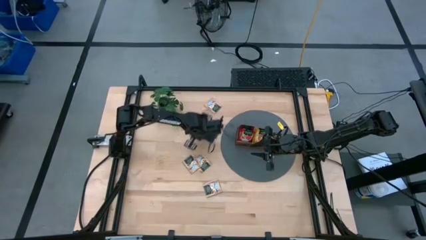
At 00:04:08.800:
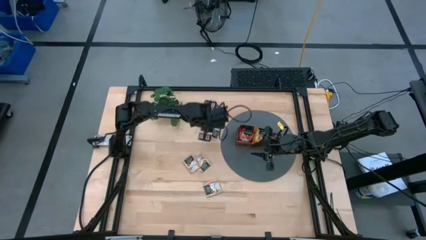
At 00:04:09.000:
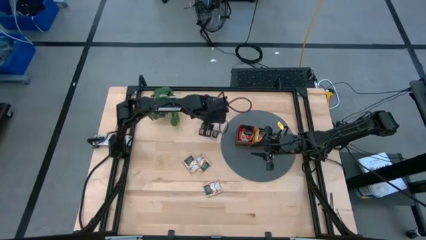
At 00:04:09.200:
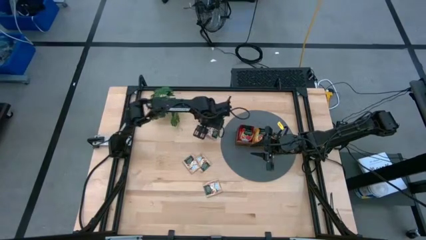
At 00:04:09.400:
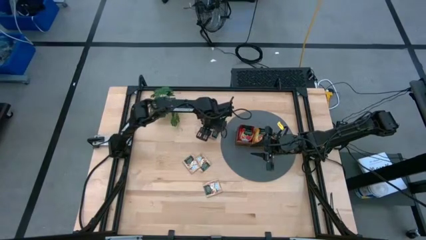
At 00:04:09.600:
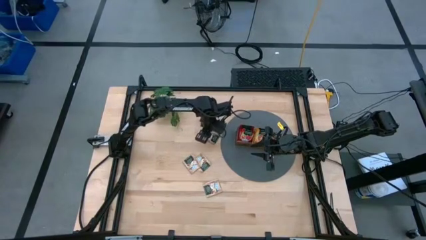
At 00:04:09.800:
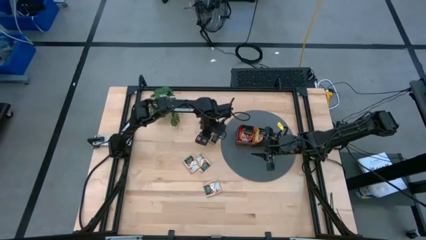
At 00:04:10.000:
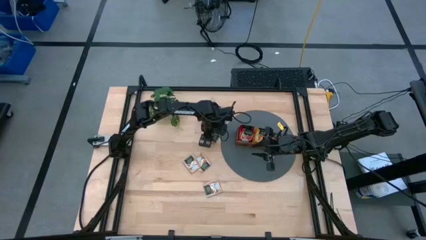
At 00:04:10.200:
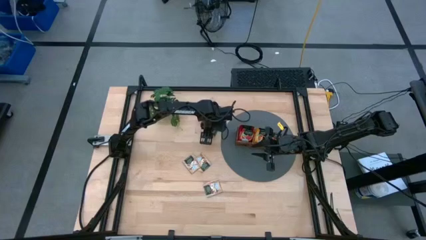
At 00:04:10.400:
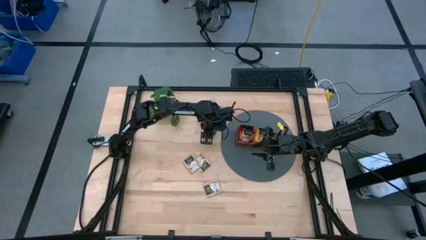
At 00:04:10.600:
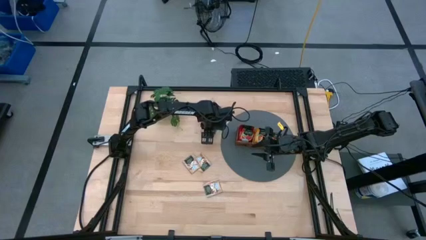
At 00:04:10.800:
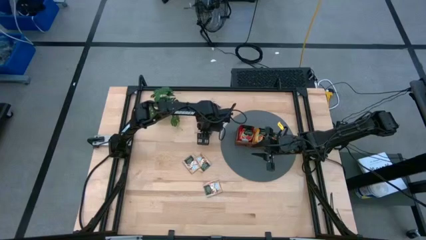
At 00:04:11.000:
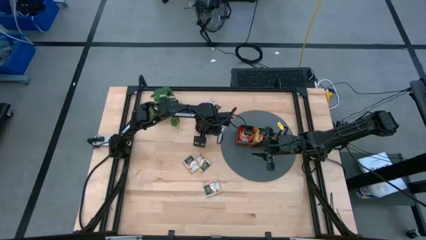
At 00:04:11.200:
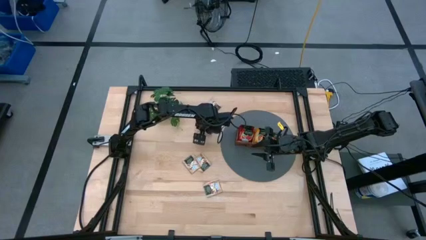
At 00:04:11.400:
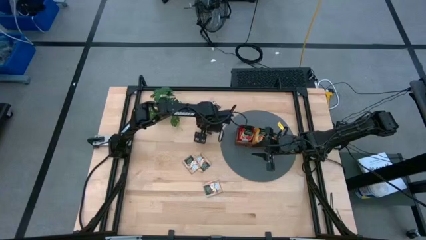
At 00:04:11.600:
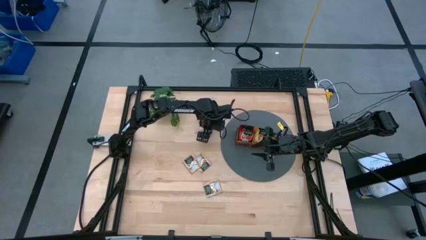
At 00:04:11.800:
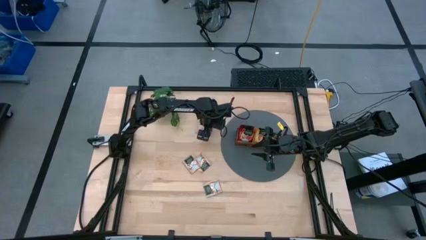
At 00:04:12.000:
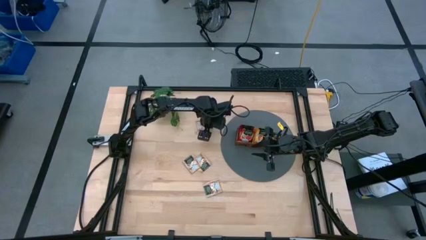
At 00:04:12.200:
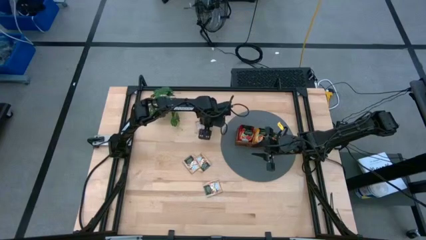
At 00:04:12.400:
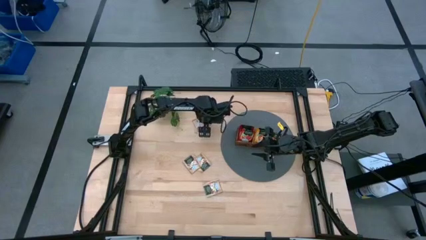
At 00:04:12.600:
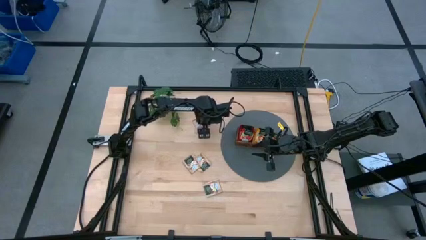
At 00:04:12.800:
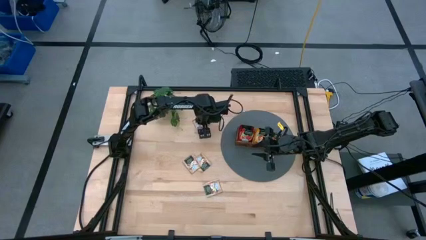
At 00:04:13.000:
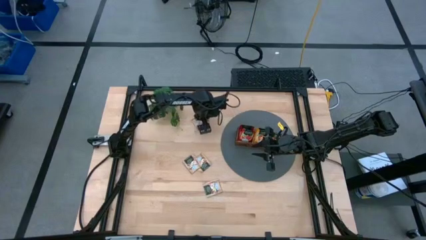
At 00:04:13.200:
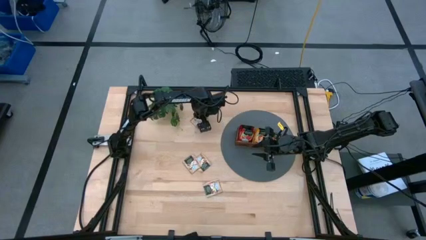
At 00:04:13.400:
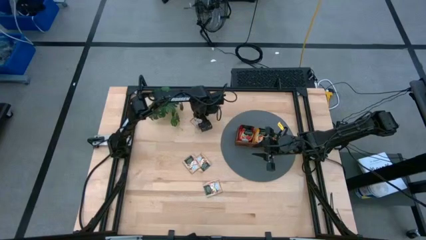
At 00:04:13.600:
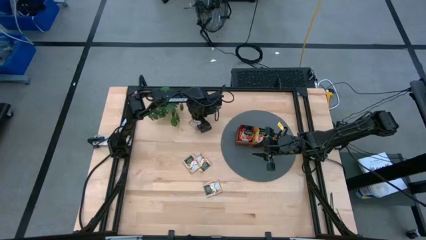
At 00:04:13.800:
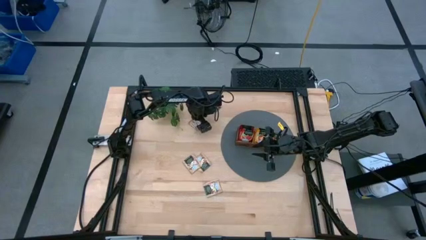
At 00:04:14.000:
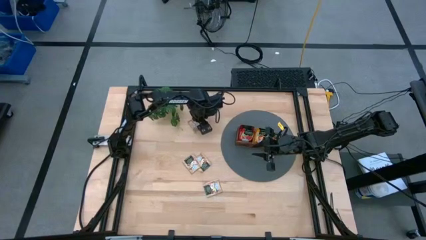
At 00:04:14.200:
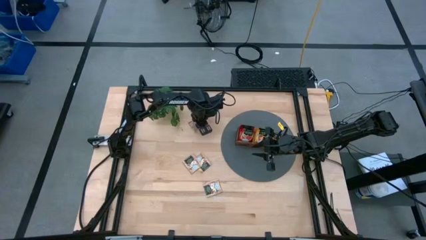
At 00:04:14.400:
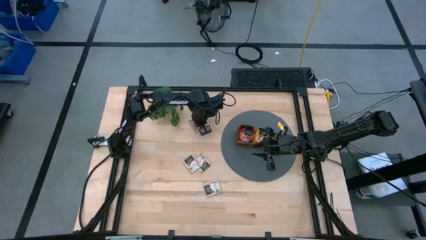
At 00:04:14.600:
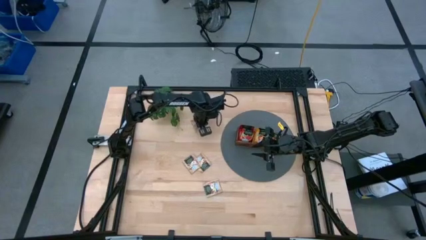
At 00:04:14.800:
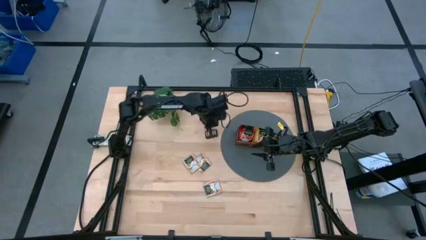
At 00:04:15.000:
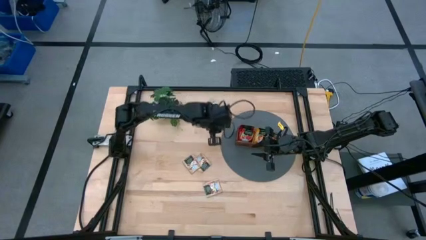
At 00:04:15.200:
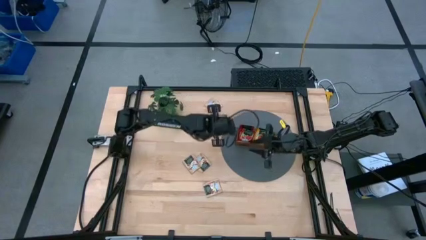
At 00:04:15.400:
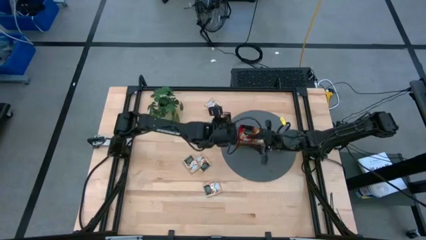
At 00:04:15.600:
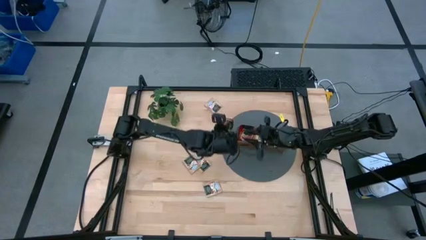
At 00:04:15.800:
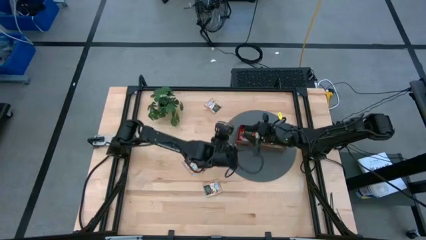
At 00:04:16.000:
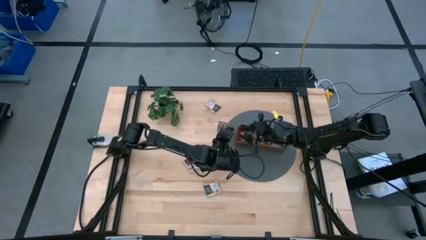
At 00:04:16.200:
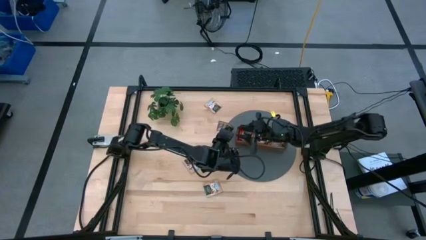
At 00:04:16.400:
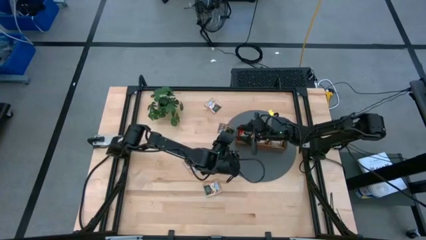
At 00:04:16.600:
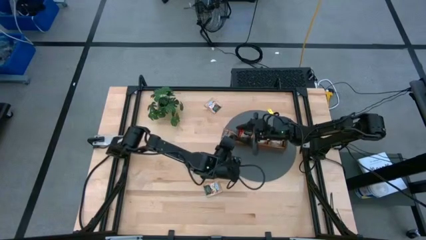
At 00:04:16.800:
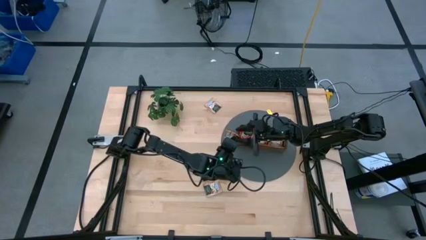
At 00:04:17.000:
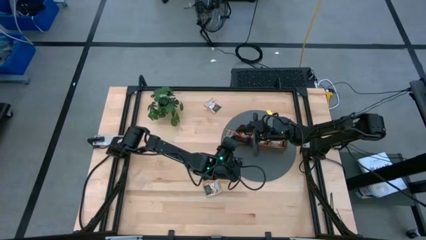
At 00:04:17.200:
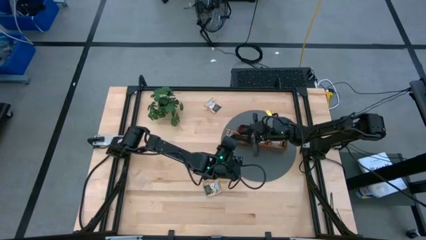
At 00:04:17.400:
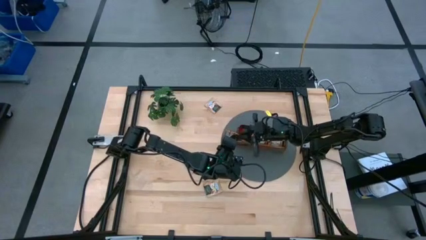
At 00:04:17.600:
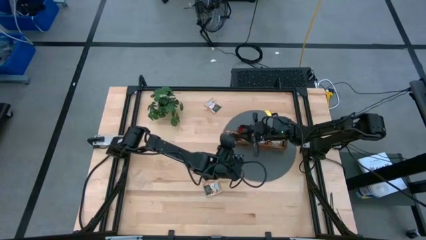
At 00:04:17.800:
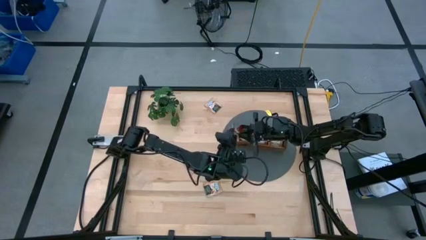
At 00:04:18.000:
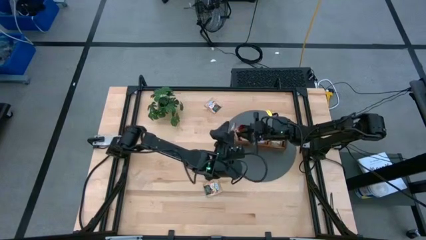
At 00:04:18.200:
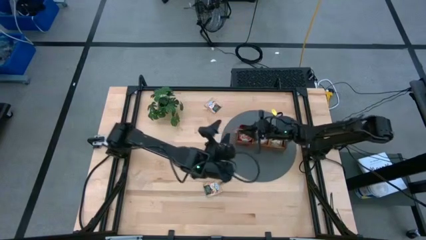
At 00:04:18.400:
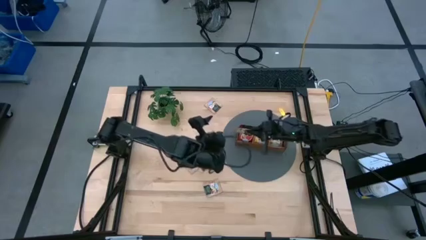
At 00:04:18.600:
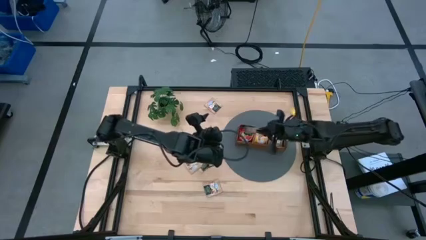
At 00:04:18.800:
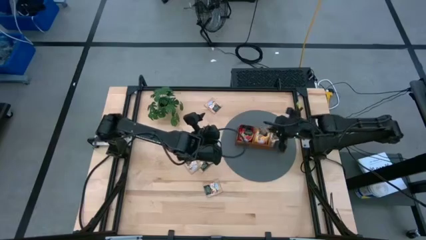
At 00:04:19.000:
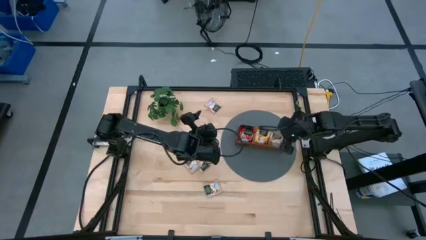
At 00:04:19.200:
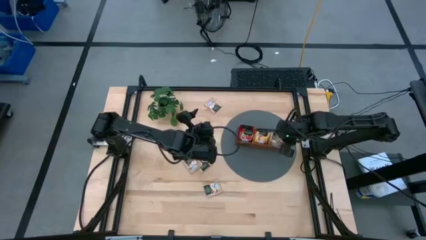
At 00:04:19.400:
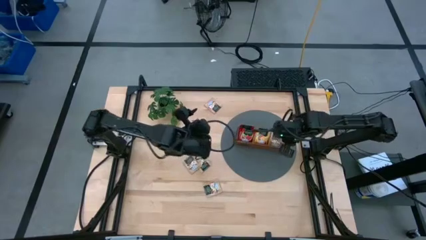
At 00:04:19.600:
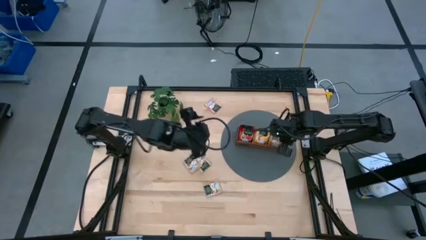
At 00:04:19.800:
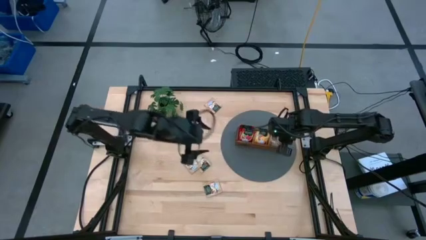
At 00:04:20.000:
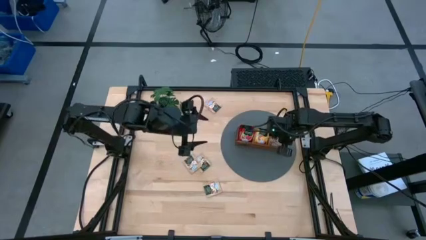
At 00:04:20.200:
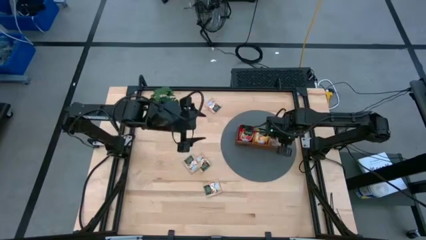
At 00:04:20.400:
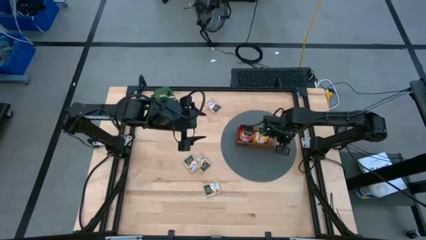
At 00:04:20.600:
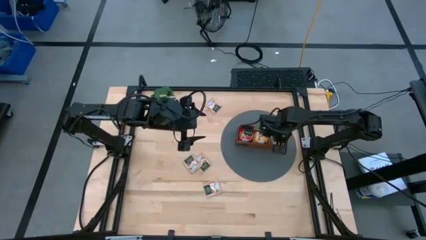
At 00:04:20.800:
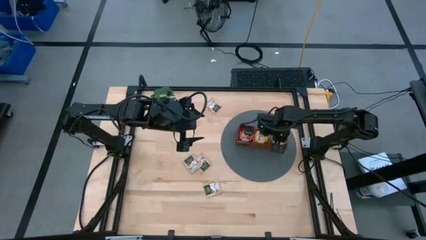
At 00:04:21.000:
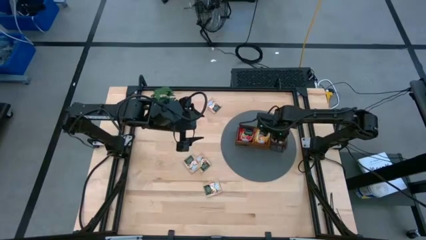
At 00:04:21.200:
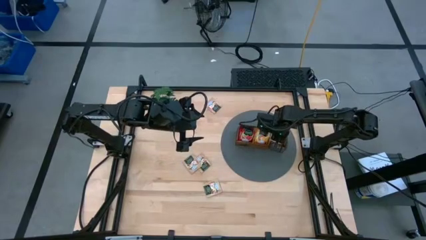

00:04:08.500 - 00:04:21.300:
Task: Pick & Place Tea
Put the brown tea bag into the right section of the wooden organizer

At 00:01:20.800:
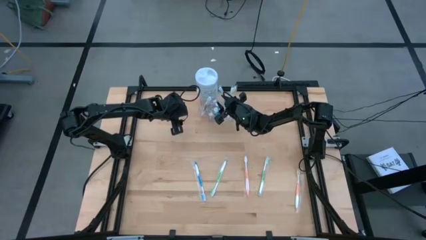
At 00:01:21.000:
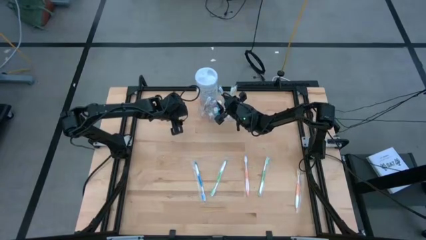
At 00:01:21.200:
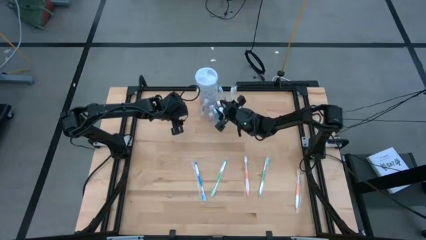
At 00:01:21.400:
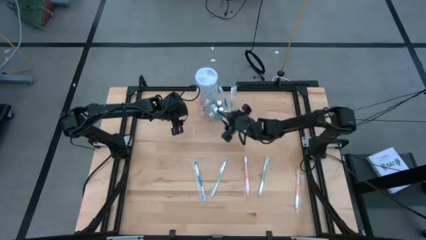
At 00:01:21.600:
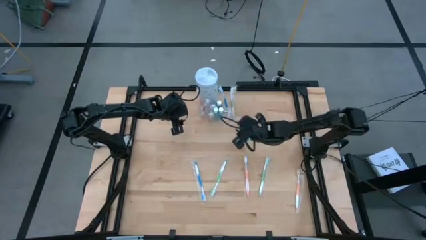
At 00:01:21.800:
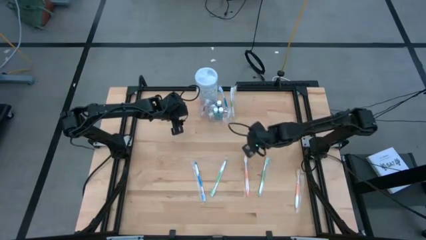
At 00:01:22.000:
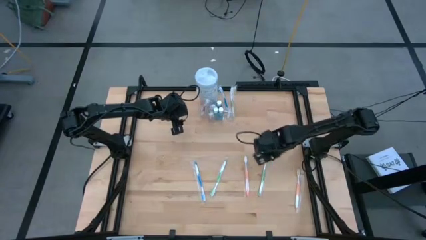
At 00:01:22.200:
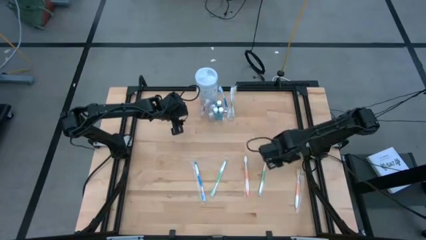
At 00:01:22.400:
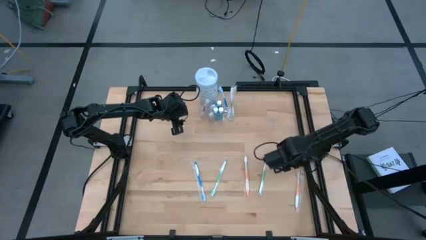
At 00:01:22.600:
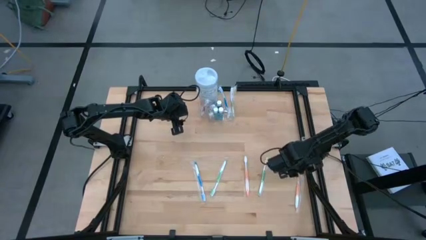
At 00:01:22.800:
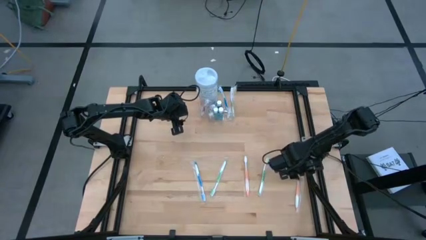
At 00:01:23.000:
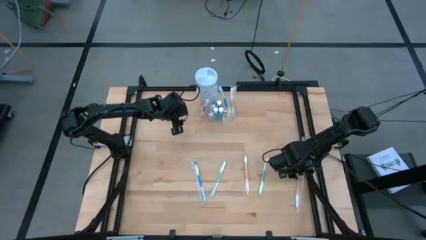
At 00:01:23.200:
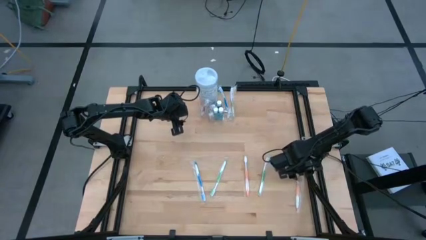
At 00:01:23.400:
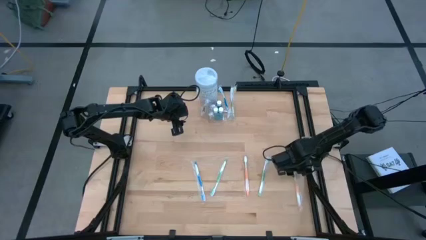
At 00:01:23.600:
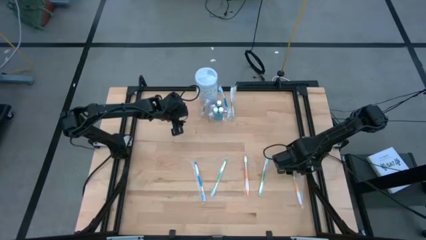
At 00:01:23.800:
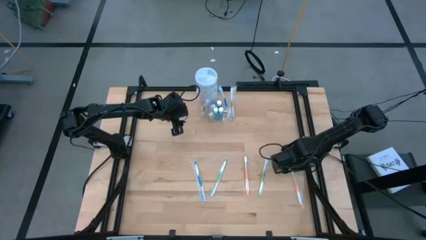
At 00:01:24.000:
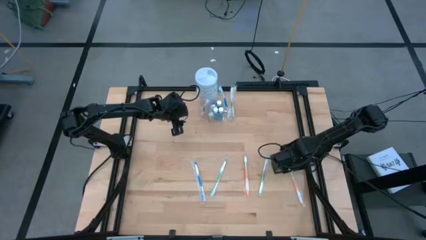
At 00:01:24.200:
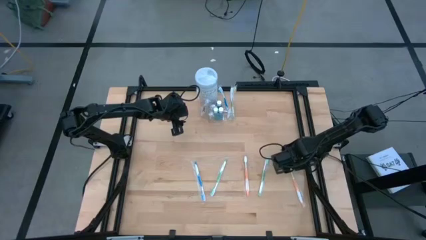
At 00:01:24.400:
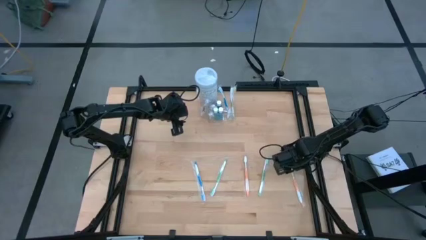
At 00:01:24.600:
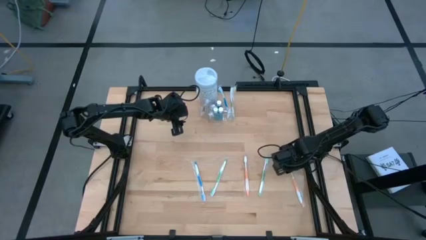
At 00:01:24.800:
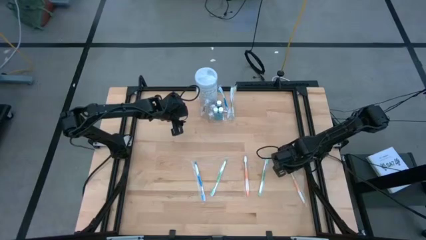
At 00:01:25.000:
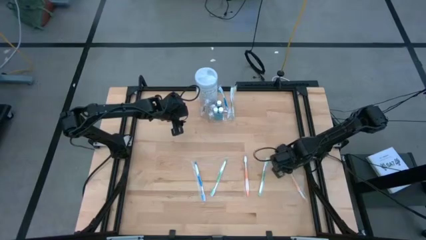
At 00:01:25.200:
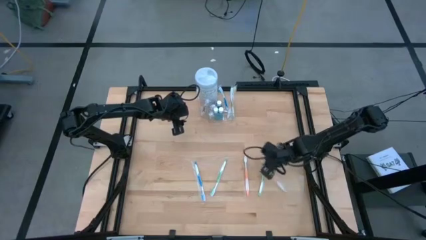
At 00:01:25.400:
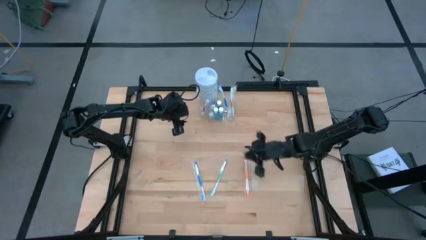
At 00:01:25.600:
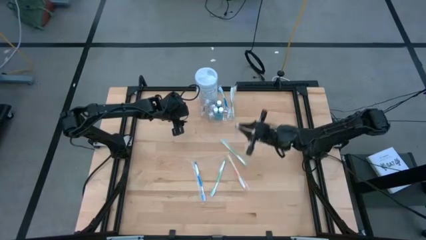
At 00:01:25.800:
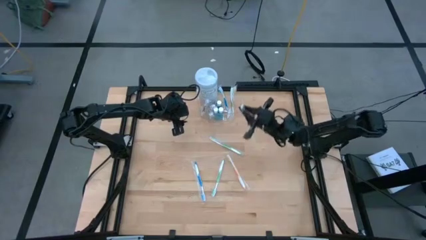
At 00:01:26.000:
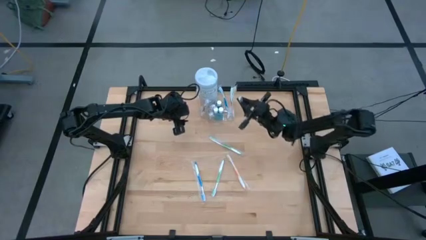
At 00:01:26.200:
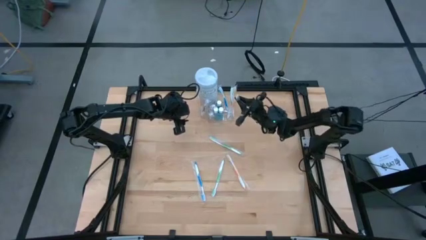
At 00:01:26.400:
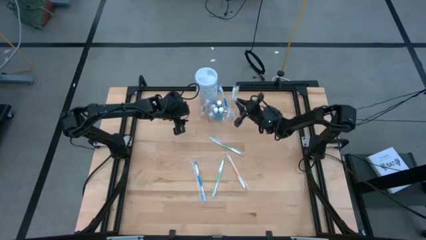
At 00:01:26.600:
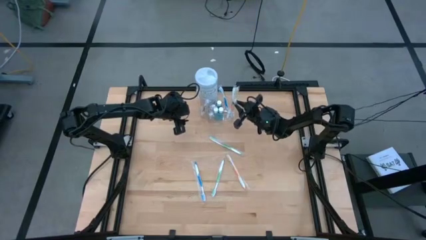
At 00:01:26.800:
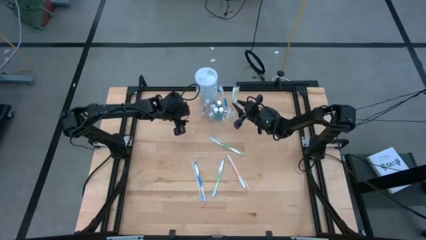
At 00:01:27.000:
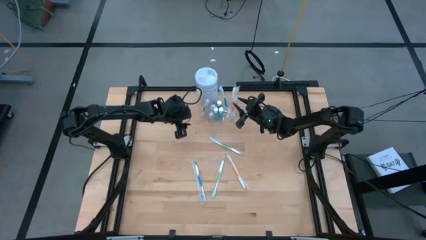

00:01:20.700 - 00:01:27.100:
Task: Pick & Place toothbrushing station
Put the orange toothbrush into the transparent organizer
